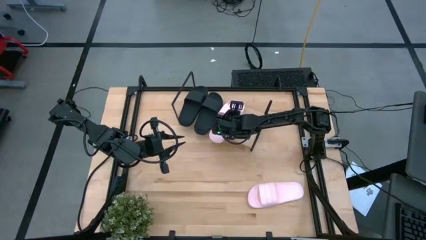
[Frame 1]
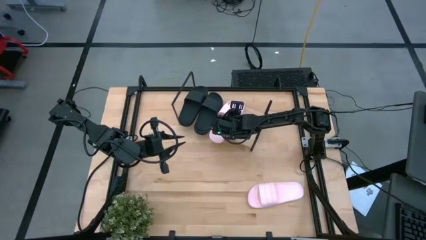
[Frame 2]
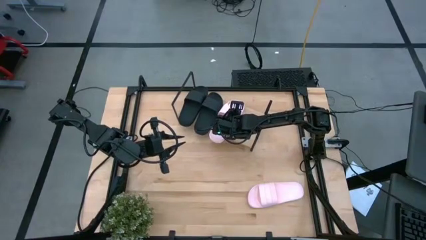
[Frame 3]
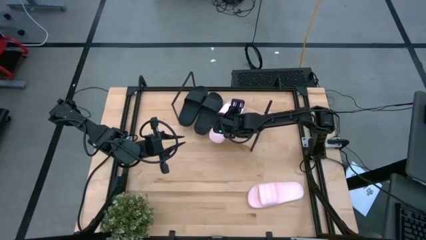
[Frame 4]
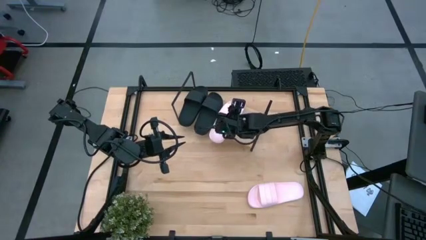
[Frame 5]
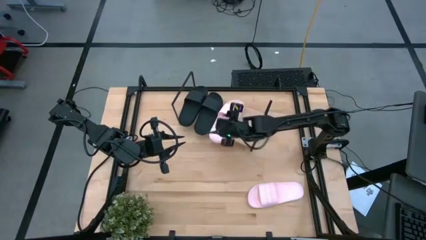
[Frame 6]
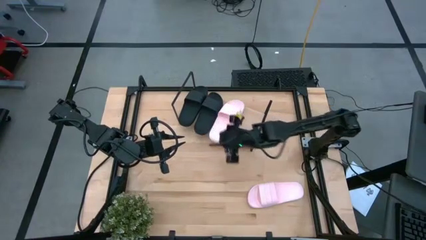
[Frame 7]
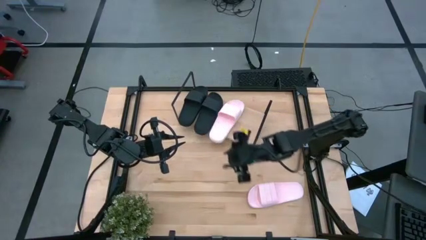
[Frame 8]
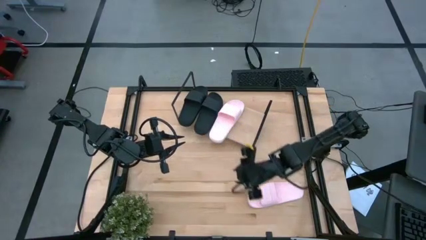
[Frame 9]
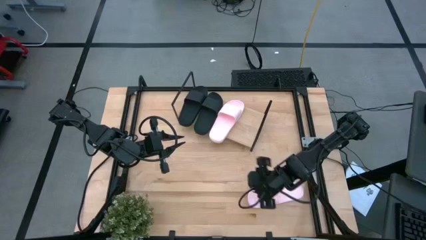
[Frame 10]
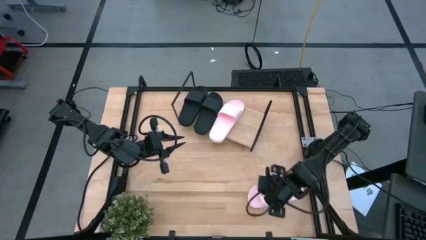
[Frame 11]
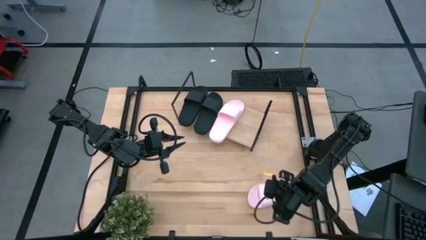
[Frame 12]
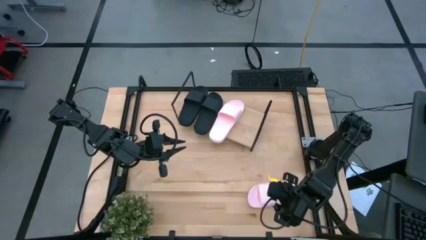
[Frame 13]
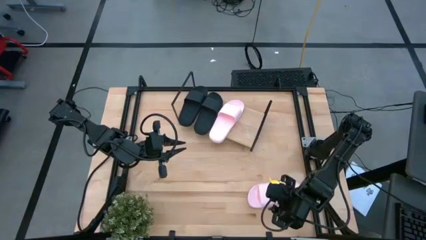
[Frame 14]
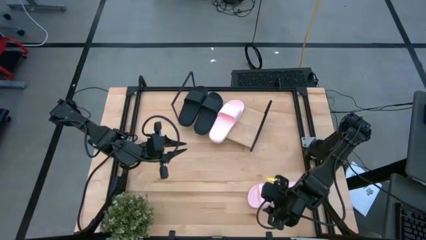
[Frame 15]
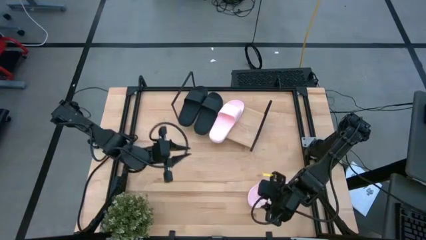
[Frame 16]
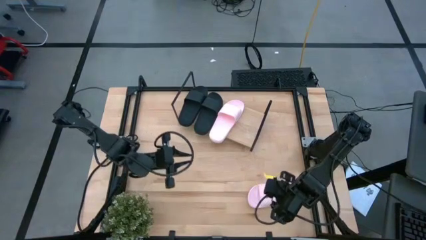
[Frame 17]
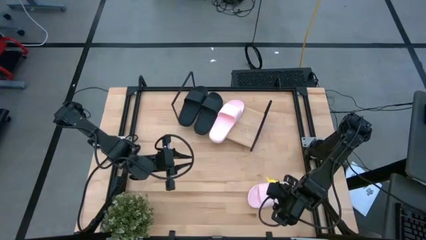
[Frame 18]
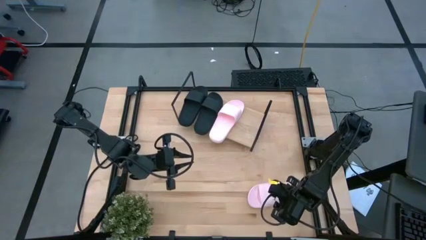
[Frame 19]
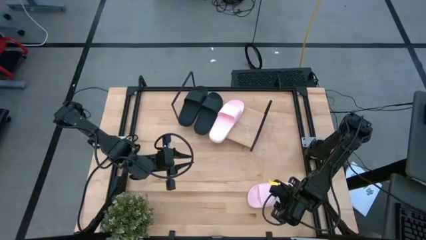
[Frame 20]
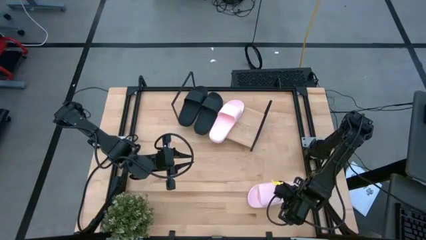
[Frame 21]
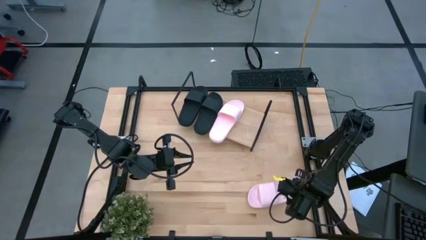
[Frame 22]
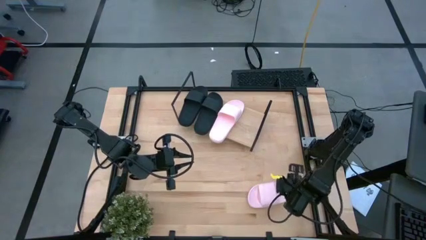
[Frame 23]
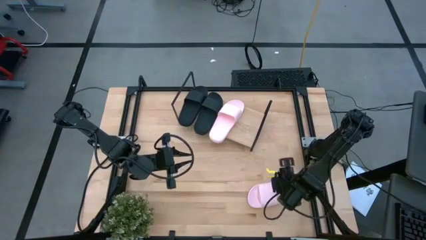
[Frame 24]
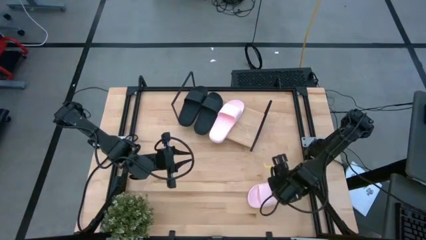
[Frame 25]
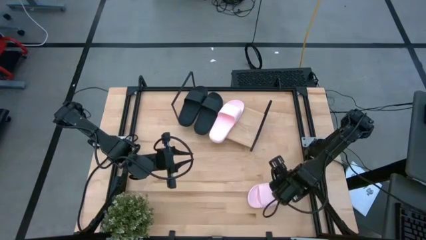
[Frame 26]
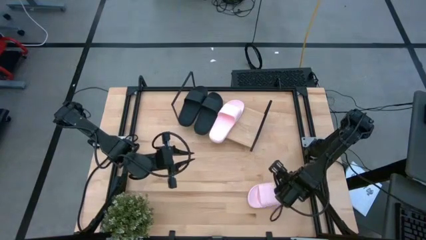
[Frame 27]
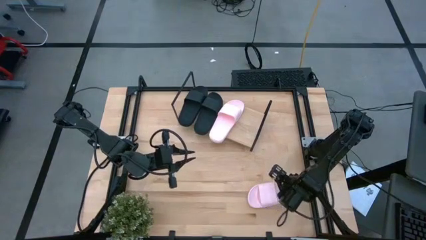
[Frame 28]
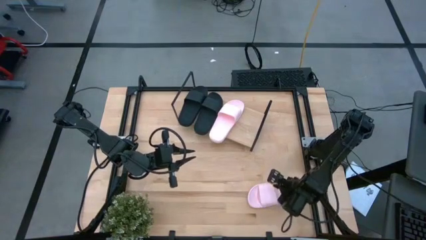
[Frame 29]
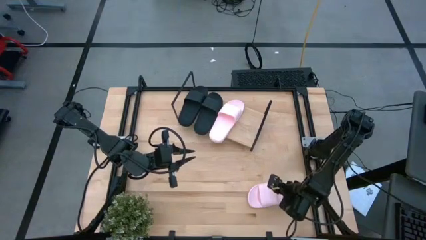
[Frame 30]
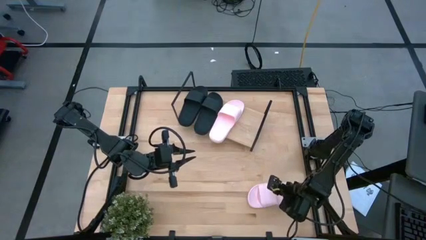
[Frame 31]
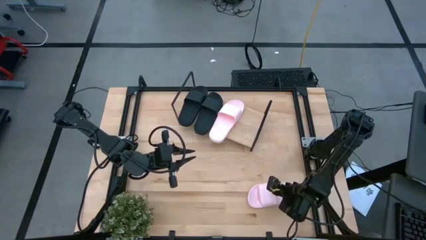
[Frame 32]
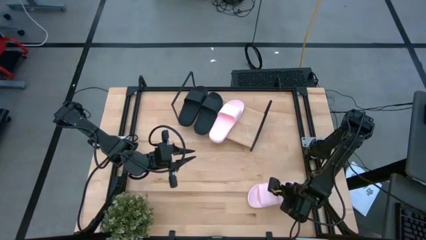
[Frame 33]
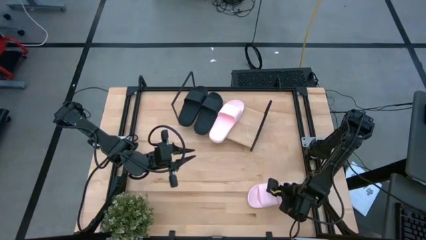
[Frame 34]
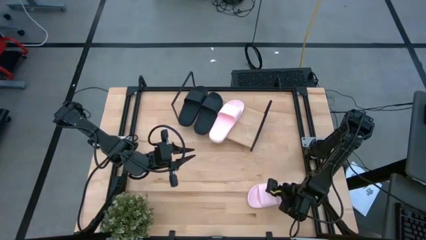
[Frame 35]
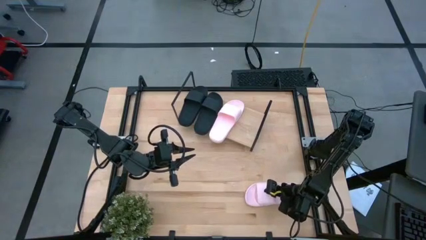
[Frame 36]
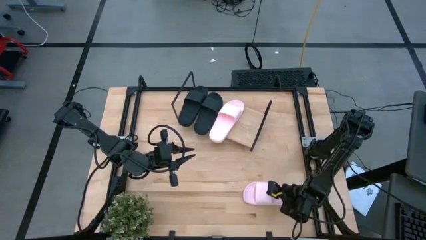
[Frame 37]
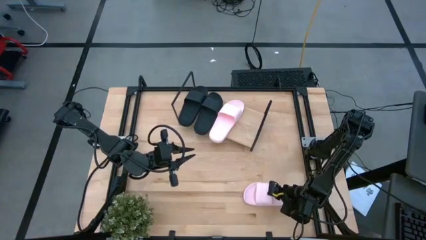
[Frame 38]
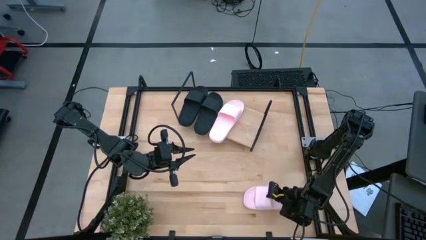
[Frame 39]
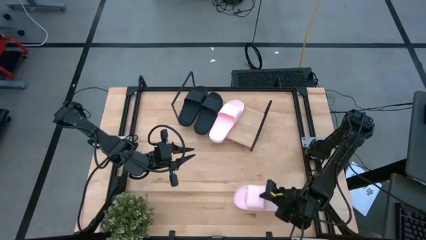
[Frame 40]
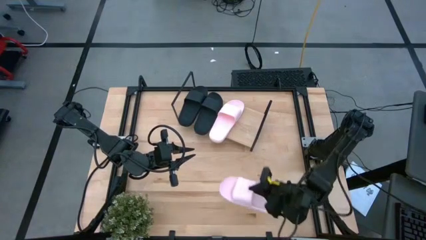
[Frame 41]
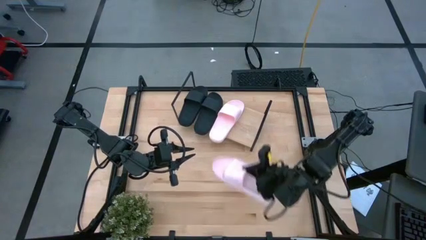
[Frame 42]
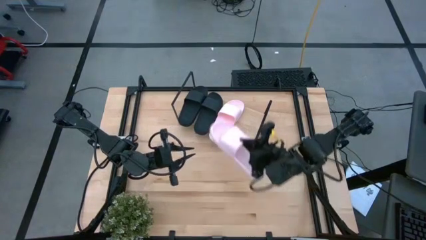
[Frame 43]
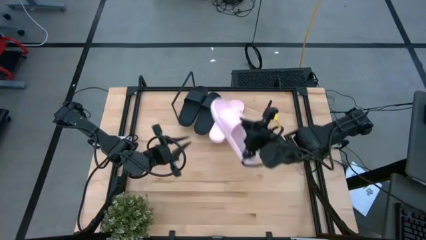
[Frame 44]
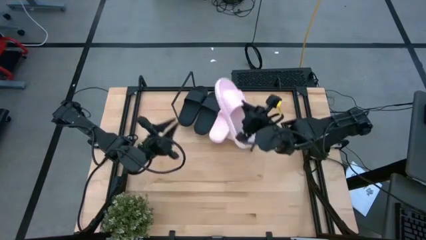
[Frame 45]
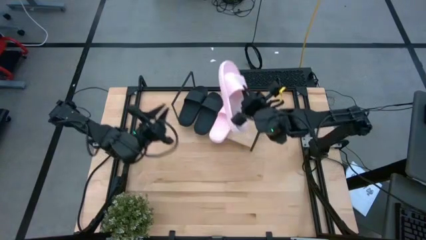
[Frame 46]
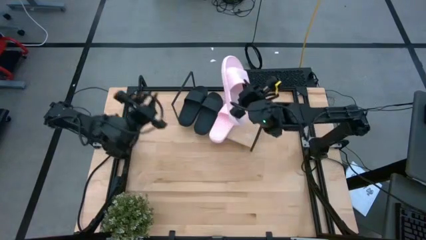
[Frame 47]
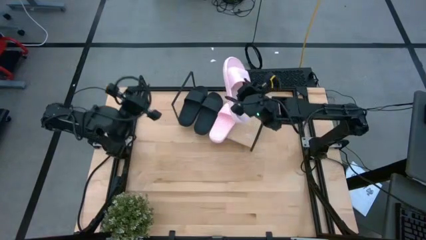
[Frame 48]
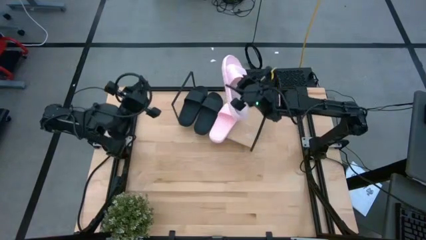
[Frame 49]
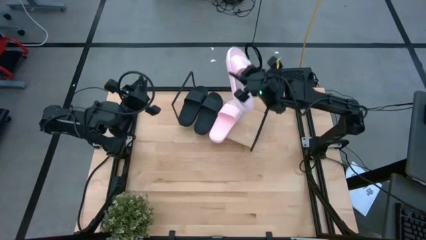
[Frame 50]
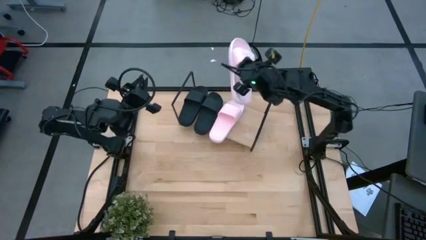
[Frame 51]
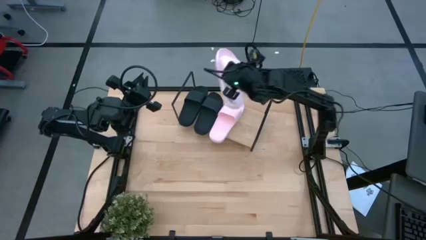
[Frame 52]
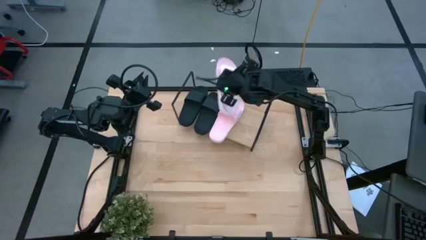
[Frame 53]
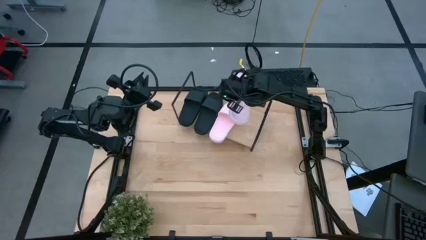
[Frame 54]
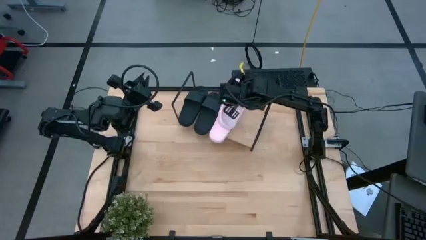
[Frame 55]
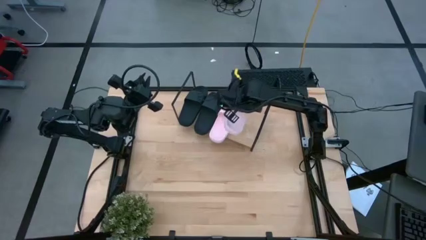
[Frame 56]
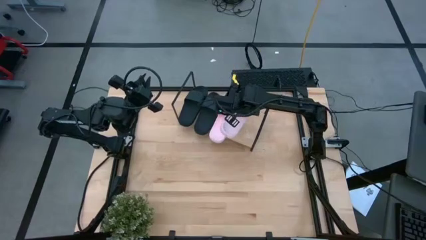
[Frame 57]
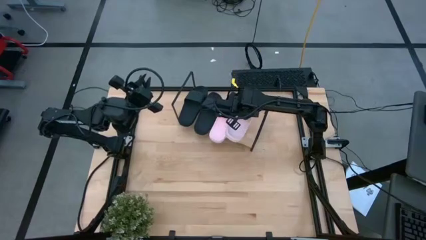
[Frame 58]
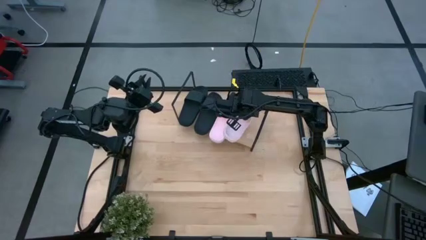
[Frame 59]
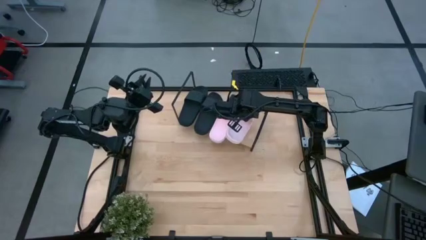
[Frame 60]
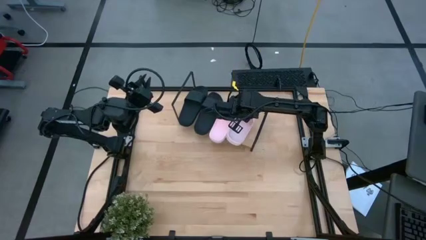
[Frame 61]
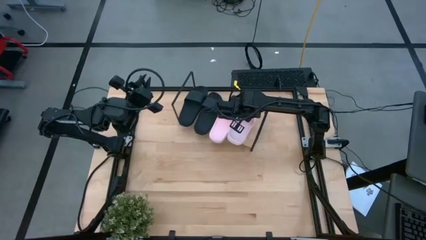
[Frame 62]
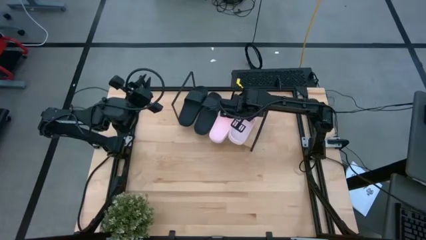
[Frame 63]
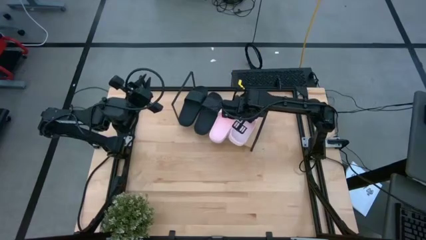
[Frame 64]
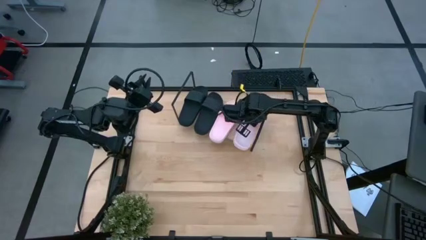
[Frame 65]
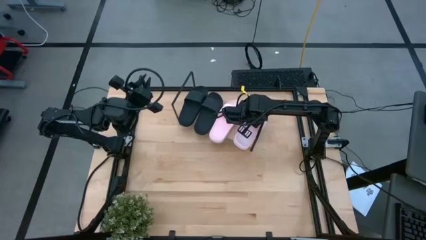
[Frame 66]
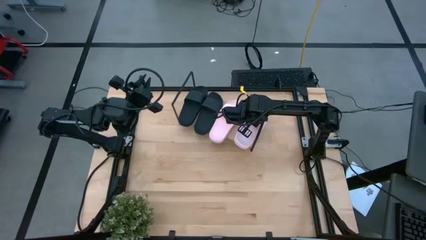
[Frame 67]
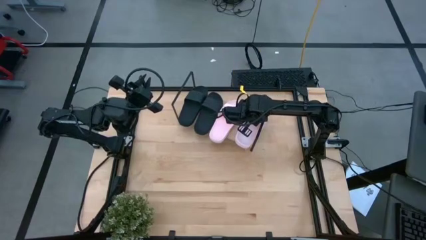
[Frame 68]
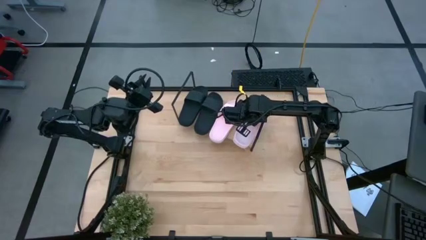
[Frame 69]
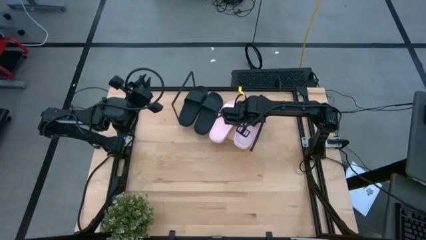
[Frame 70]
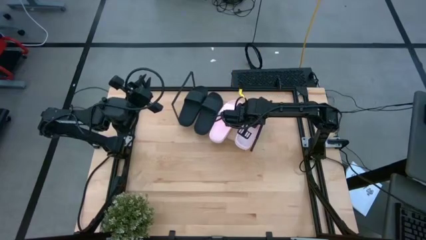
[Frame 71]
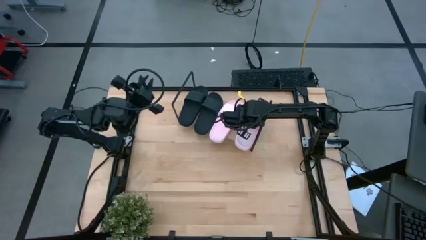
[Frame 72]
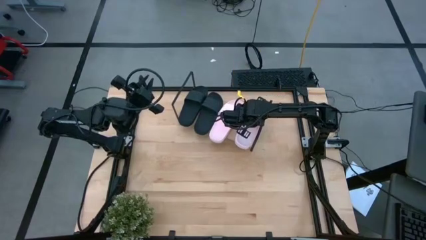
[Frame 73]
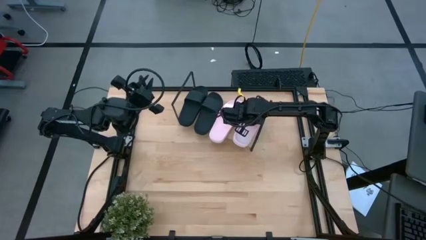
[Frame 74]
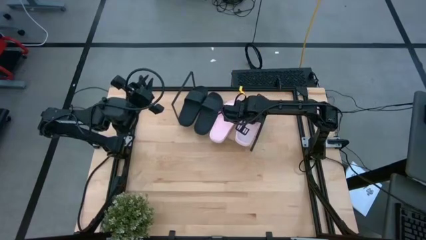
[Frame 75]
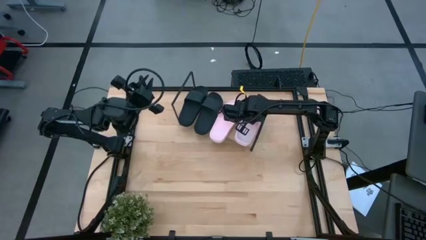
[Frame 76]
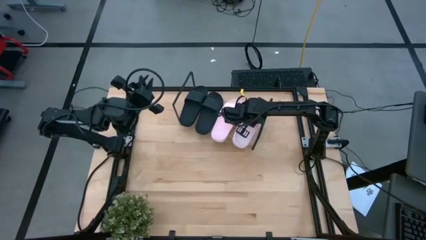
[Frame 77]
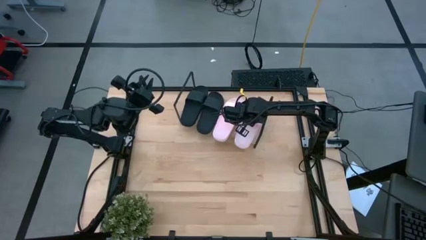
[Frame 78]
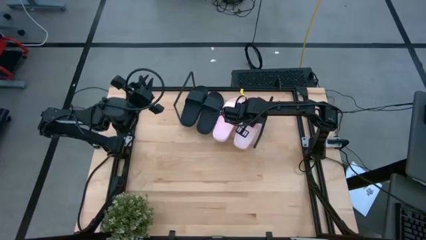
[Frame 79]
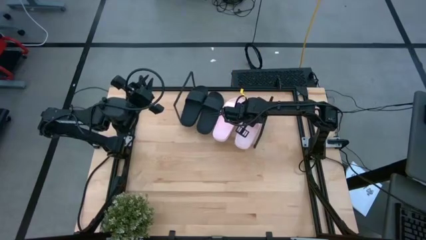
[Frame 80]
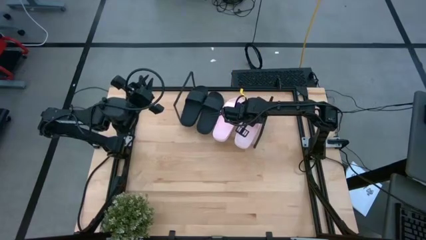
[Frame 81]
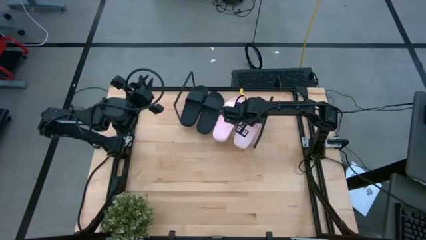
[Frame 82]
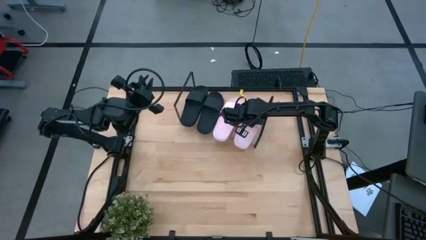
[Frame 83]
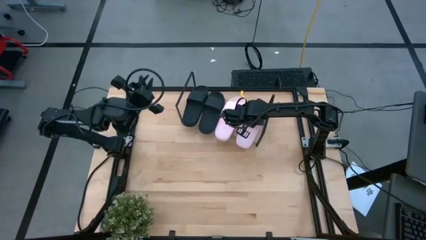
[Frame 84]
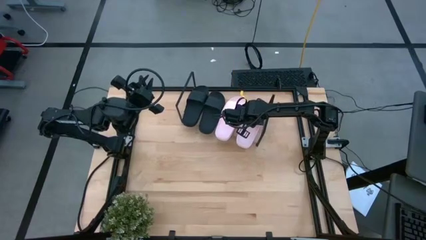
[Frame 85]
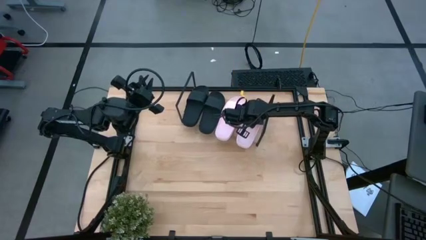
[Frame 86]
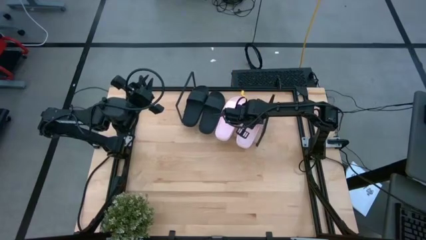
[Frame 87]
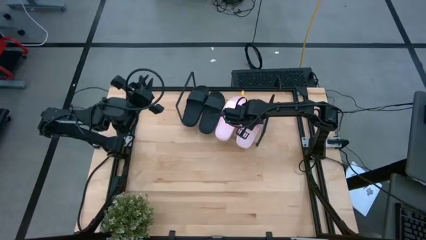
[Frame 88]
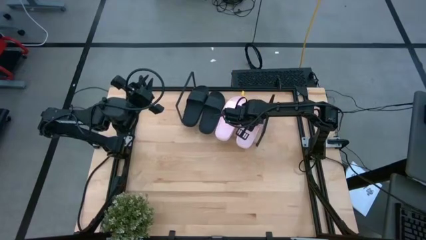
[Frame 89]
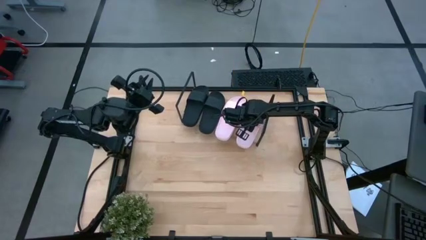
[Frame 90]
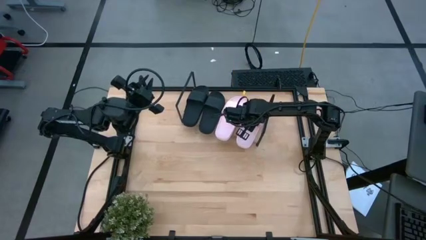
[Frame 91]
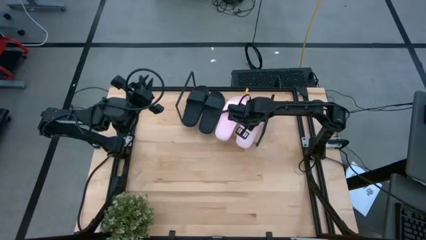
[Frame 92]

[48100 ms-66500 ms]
Task: Pick and place slides into the shelf
Put the pink slides on the shelf
